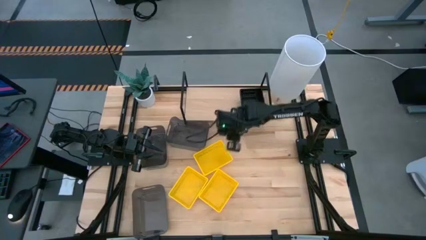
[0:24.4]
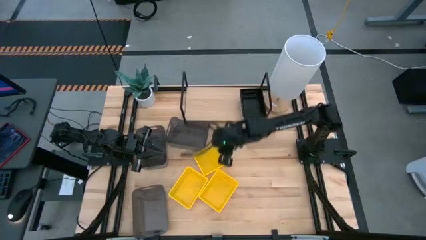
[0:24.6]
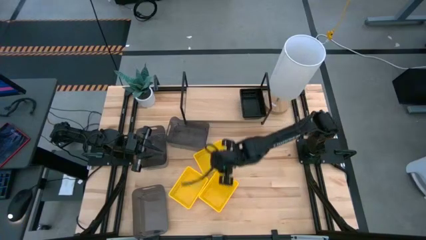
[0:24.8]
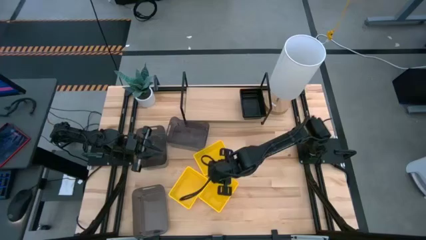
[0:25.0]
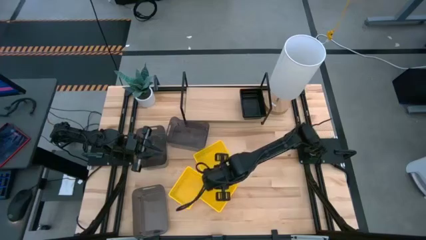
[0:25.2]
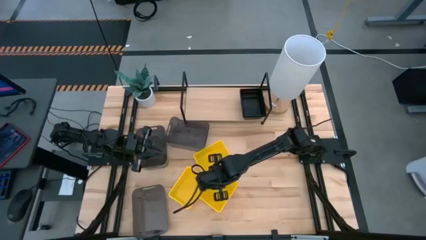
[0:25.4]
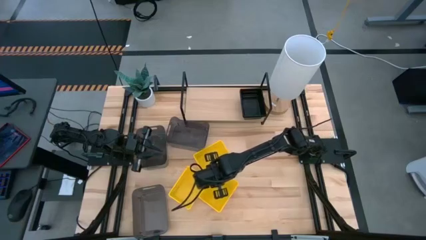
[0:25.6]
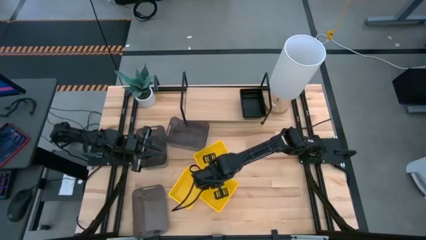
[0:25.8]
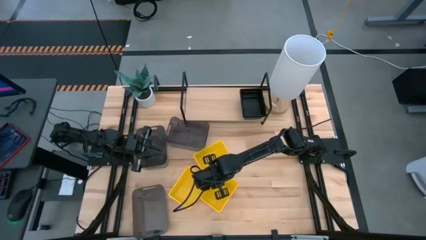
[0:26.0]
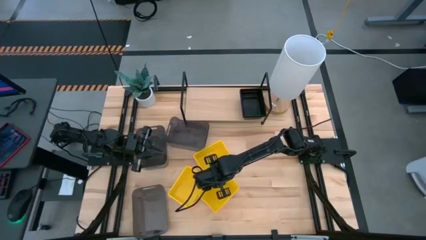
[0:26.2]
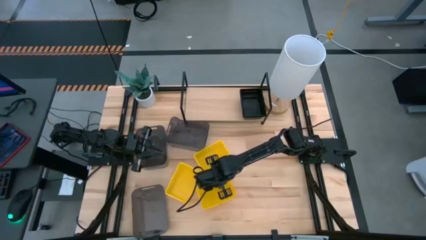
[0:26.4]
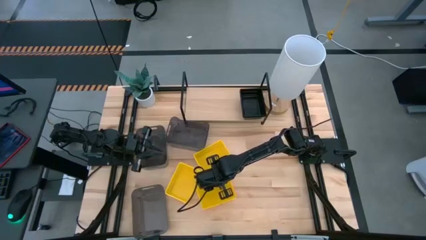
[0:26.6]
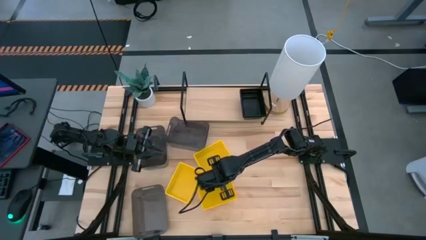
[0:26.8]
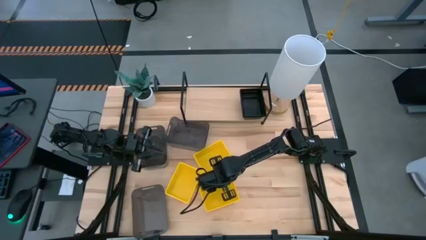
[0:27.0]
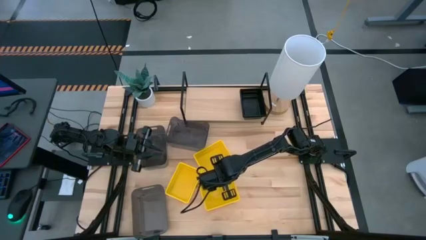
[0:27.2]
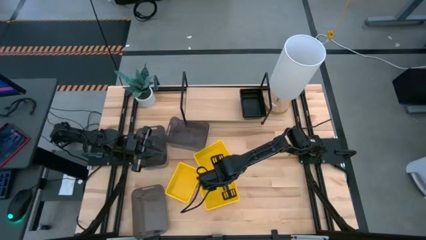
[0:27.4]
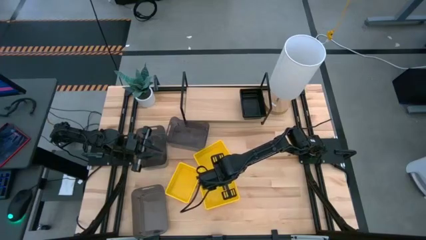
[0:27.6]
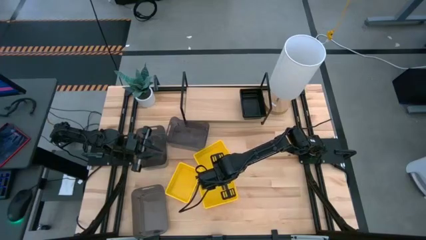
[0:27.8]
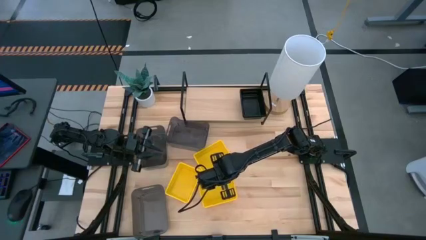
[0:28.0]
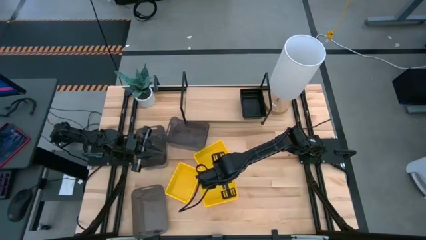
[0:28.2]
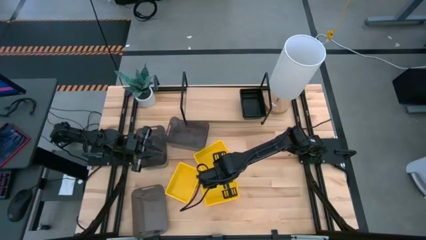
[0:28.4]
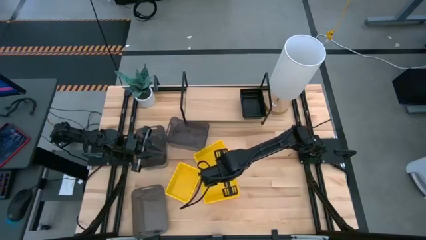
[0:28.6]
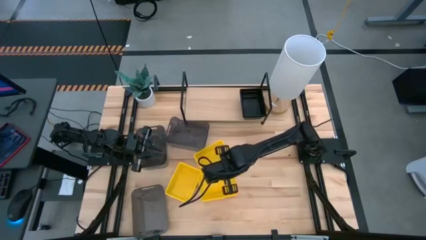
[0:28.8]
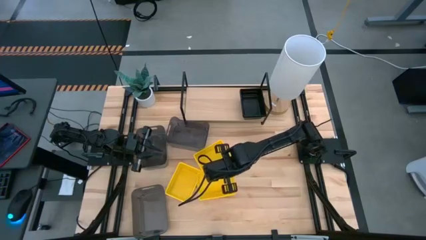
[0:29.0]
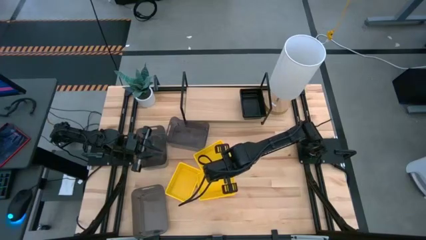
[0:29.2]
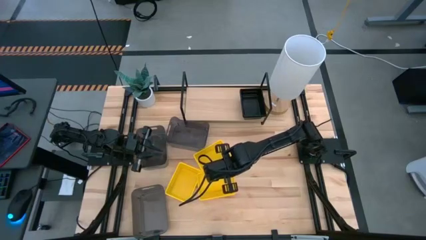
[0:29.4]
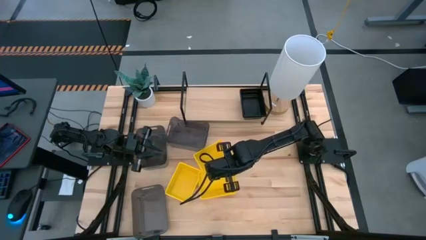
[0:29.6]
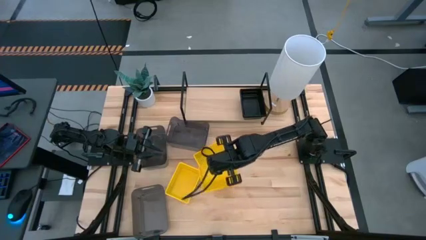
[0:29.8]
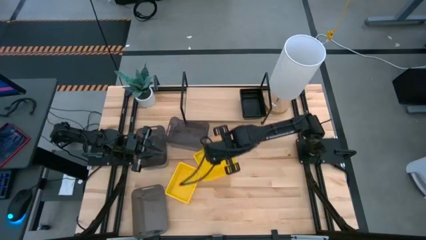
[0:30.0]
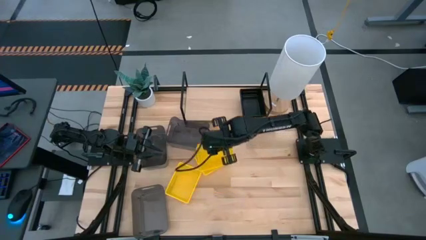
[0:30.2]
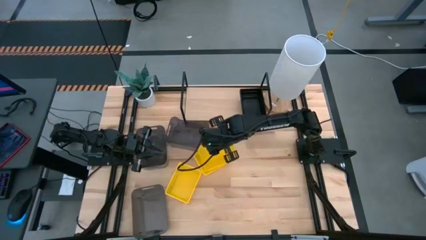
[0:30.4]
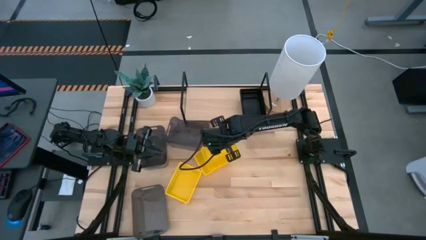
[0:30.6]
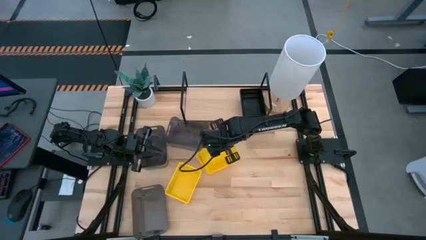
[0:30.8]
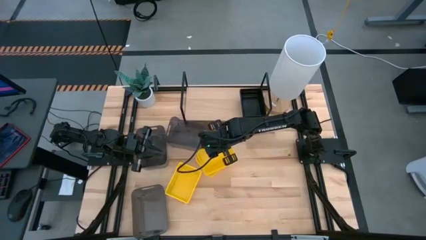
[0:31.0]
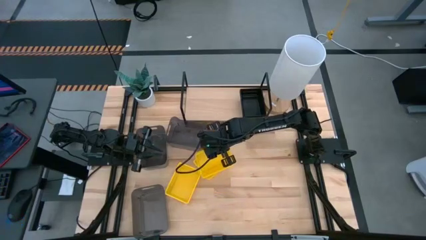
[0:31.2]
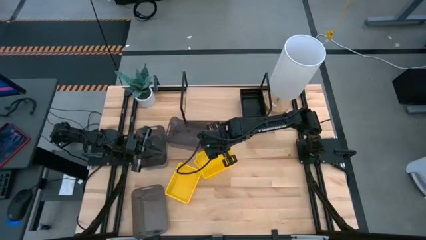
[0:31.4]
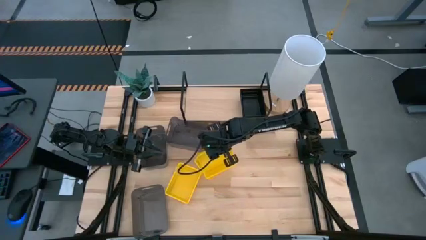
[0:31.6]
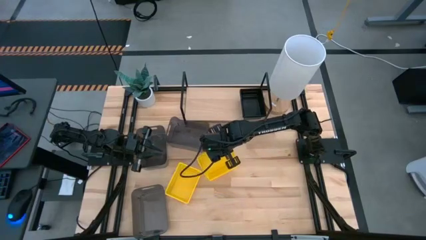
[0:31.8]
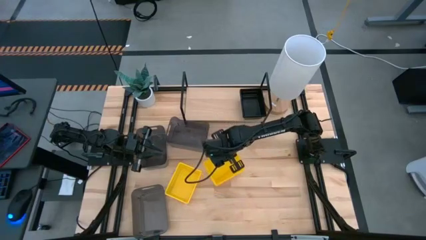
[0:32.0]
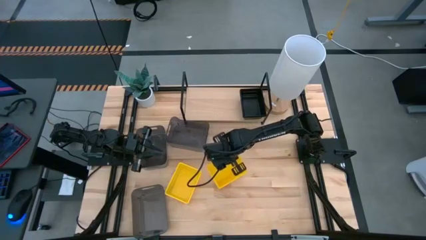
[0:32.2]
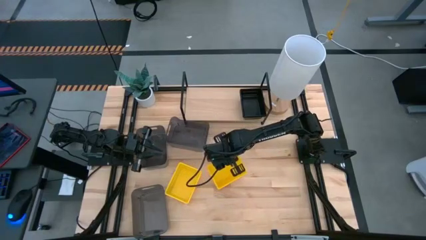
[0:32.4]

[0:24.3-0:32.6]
Task: Stack baskets on shelf by color
Stack the bottom right yellow bin on the top yellow bin

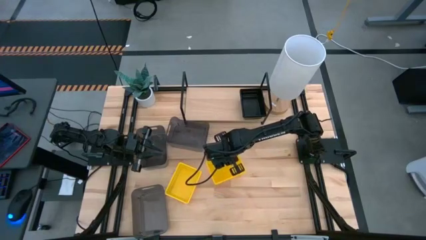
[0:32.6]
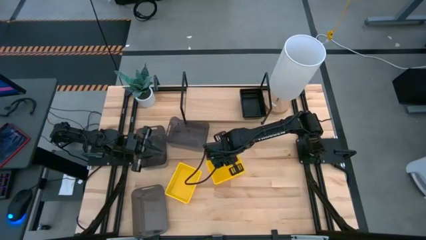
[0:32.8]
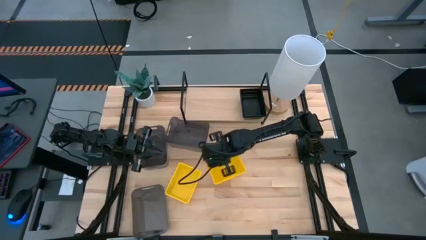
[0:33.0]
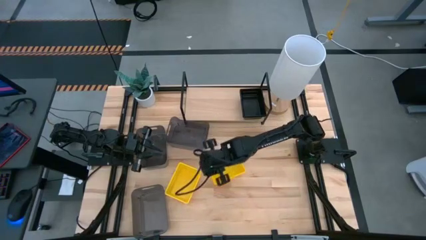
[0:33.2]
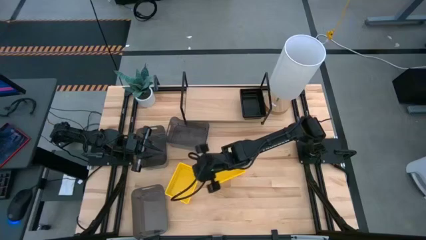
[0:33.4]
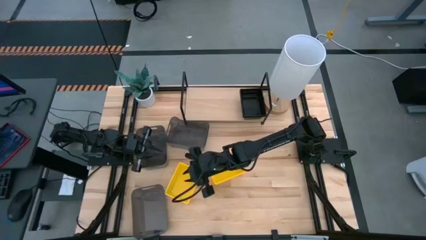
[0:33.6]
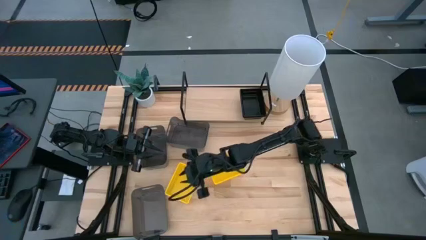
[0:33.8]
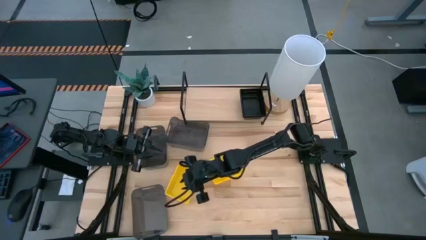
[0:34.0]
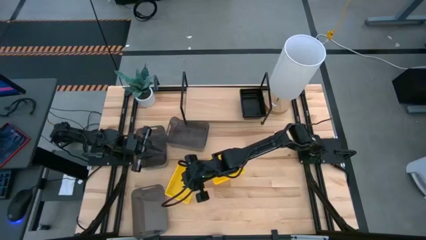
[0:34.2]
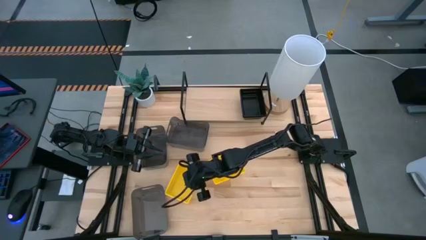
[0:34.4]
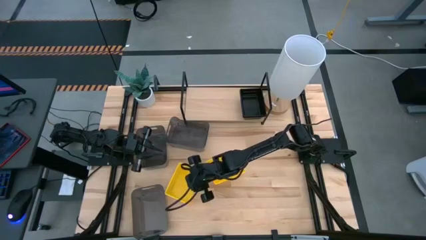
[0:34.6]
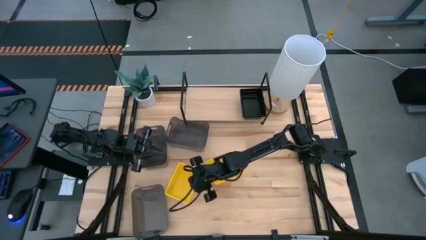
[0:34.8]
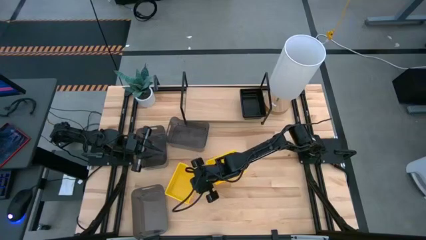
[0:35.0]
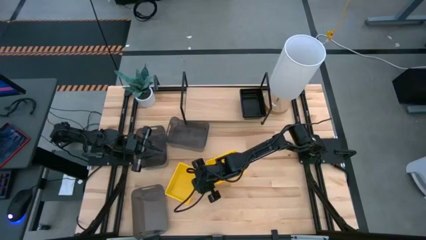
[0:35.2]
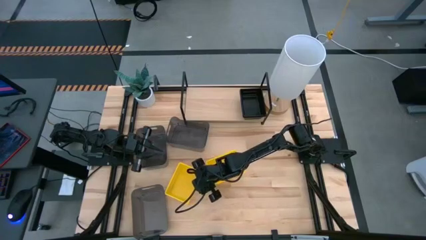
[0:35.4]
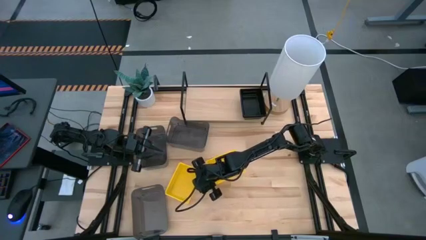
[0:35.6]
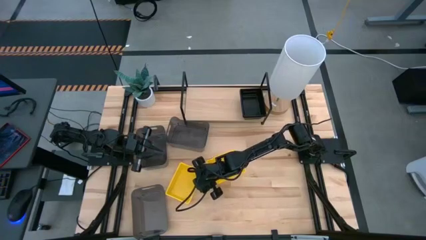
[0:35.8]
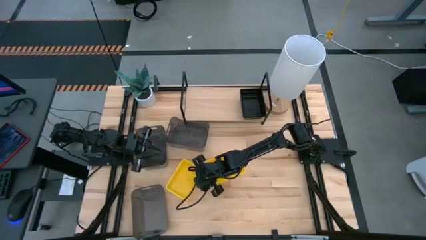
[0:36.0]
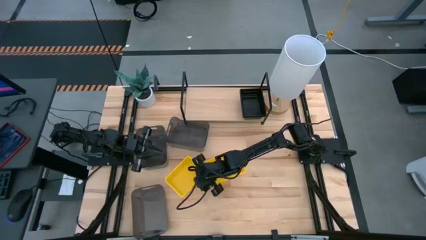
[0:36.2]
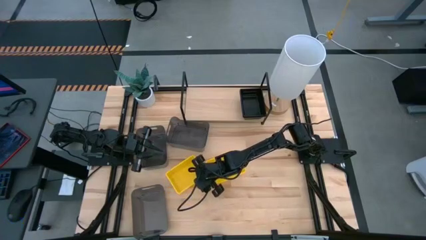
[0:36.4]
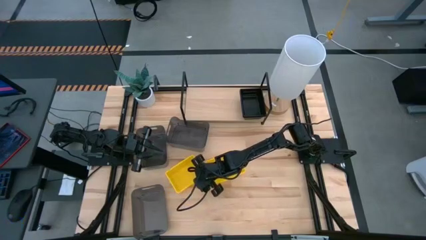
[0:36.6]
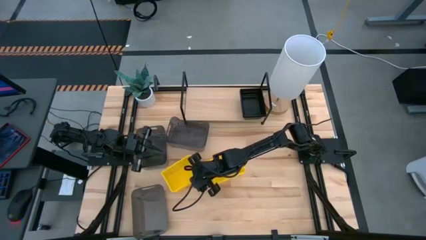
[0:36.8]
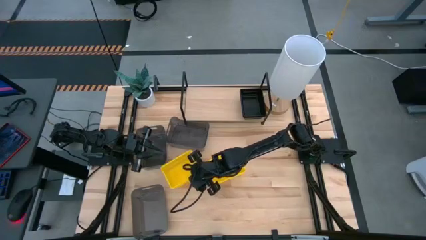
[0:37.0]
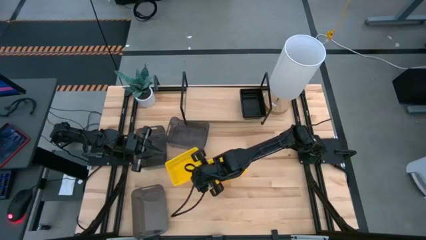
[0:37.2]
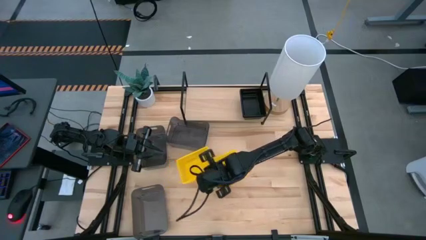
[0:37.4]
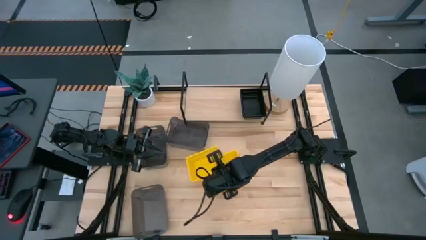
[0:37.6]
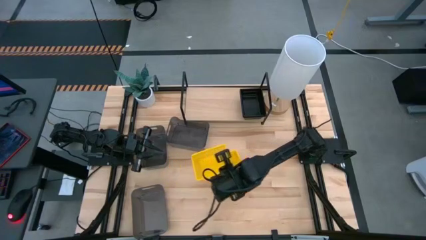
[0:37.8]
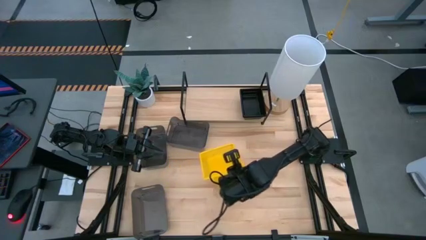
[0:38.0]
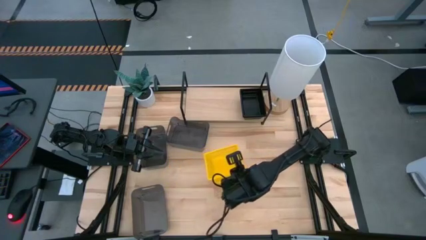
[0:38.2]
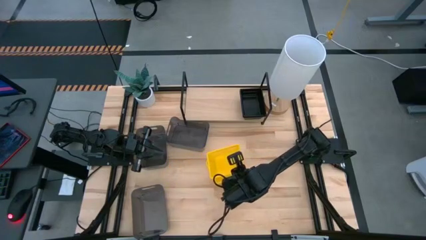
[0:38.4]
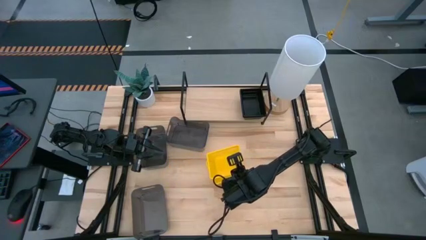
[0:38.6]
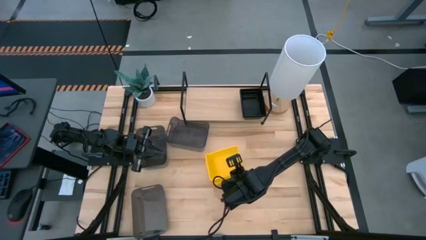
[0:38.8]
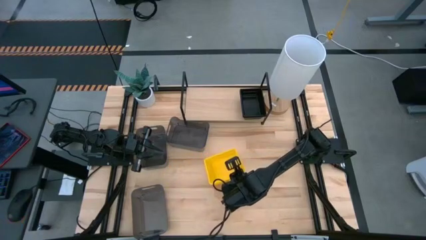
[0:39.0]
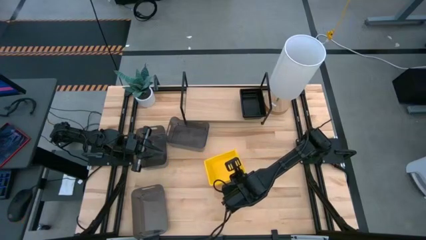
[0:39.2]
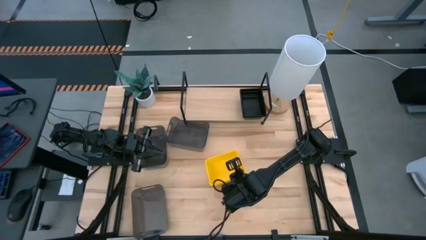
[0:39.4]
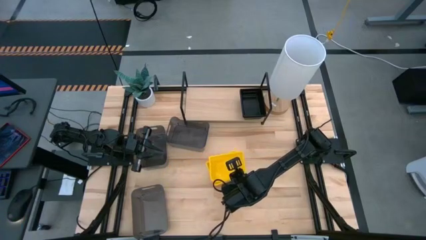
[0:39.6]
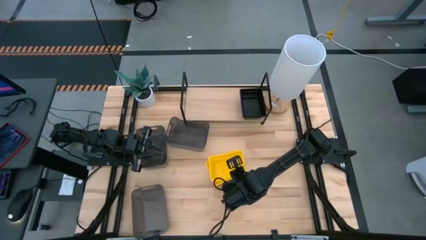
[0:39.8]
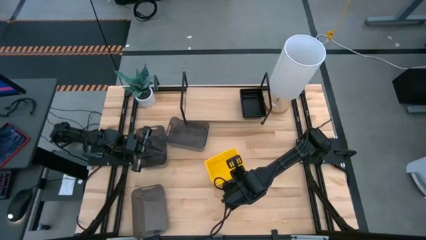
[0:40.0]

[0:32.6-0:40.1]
Stack the left yellow bin on the right yellow bin

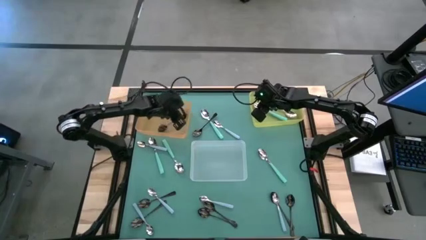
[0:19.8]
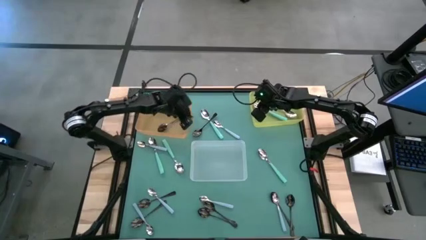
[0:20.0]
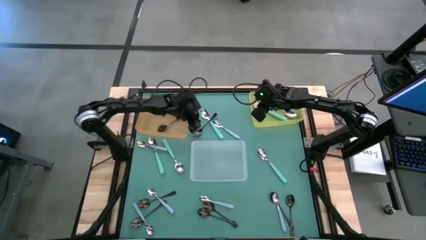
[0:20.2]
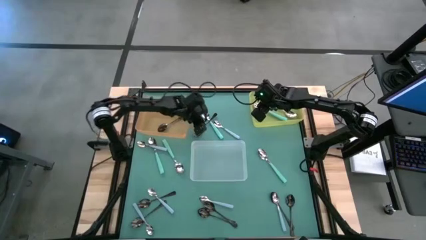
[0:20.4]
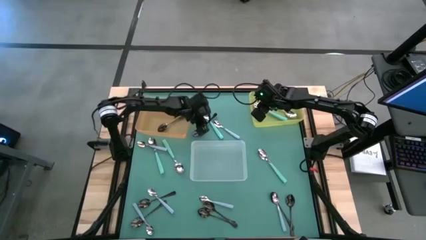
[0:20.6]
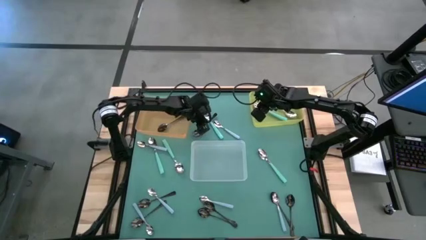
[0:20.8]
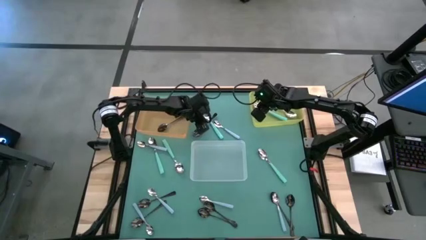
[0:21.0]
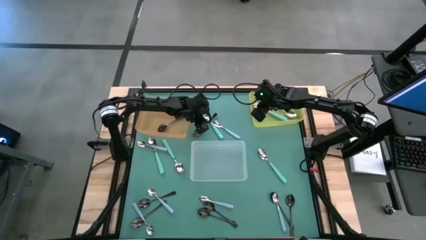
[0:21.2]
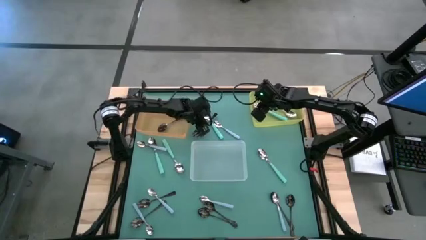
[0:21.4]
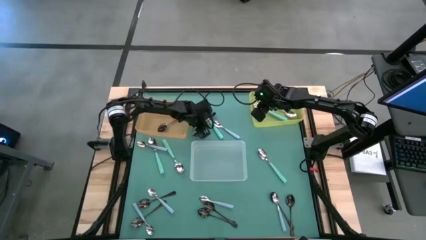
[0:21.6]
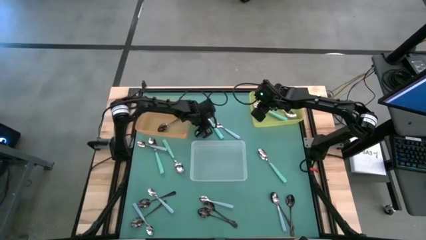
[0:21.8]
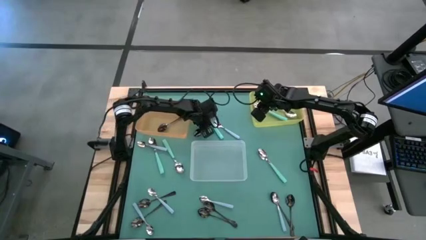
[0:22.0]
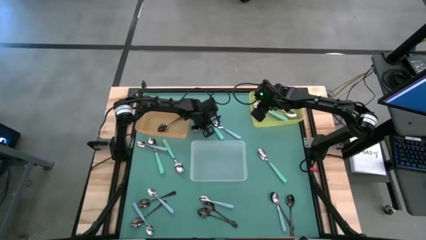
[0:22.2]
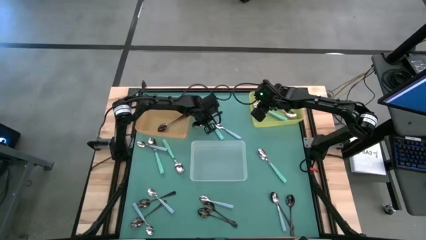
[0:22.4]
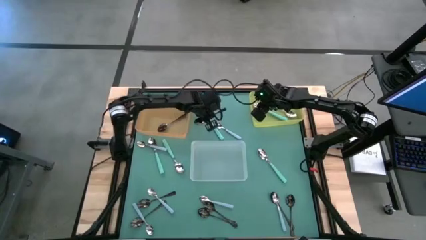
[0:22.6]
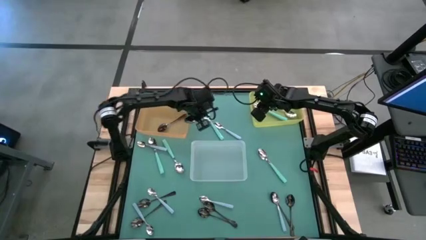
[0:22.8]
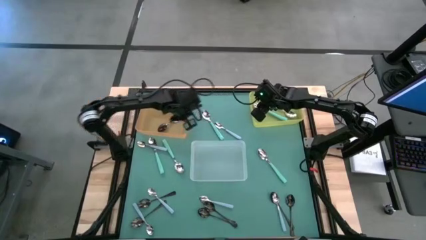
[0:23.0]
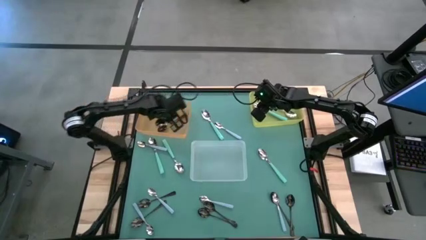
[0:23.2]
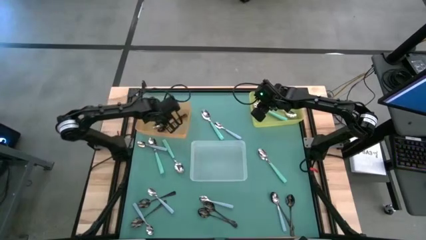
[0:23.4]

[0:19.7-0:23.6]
Task: Sort silverware by color (type)
Put the black spoon into the orange bin
